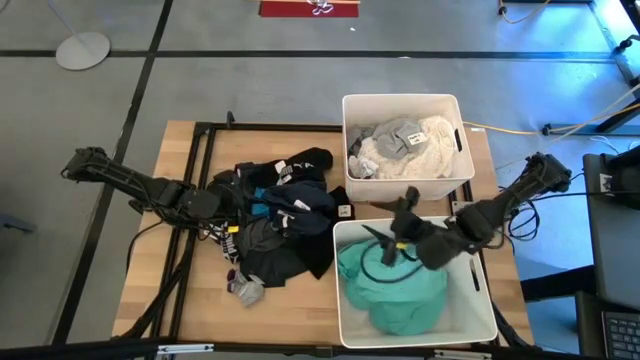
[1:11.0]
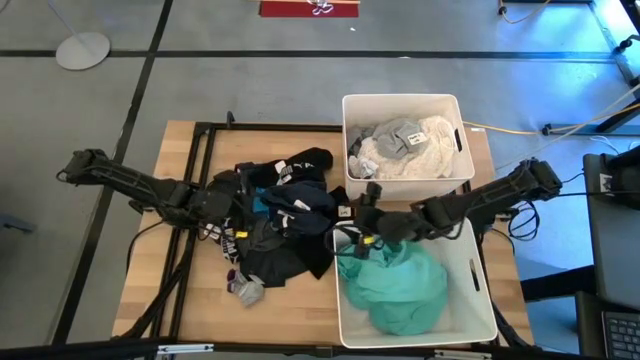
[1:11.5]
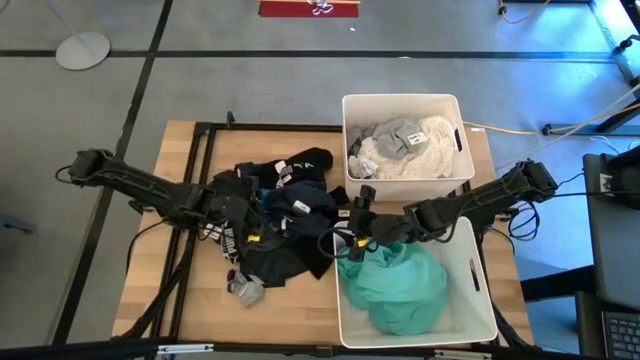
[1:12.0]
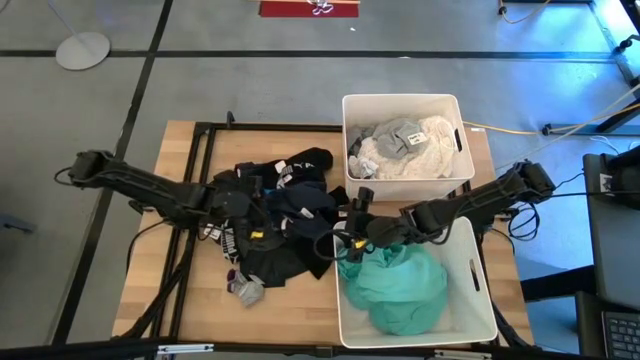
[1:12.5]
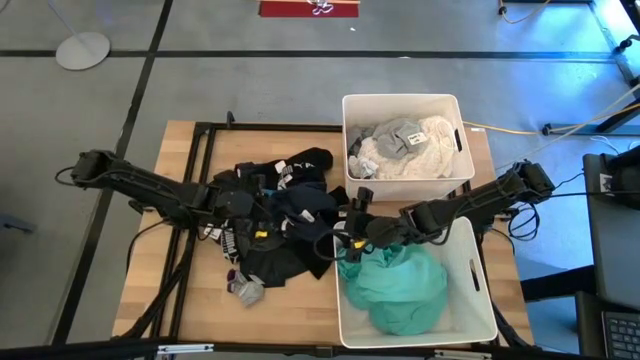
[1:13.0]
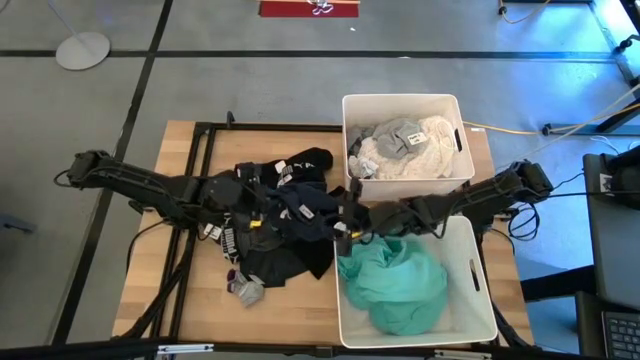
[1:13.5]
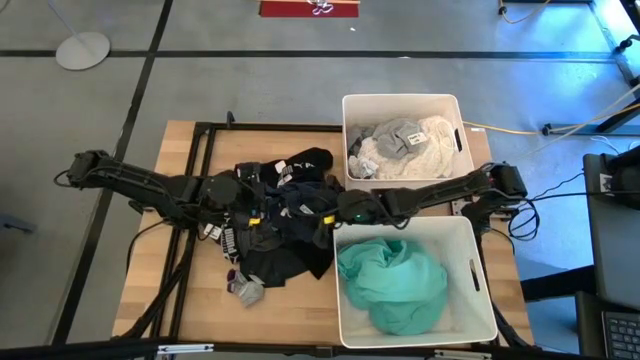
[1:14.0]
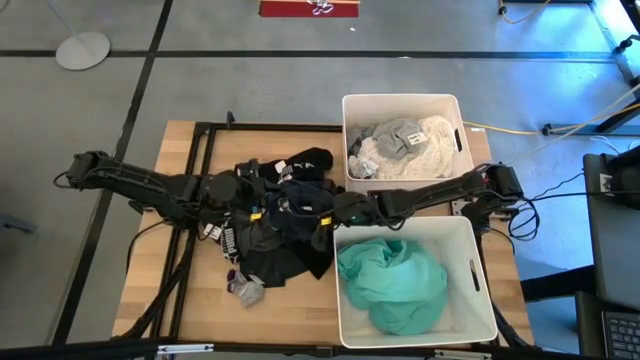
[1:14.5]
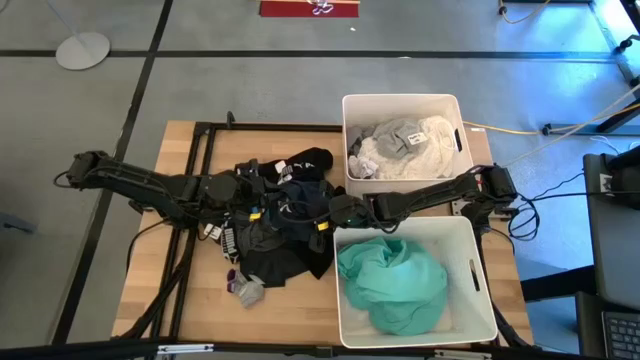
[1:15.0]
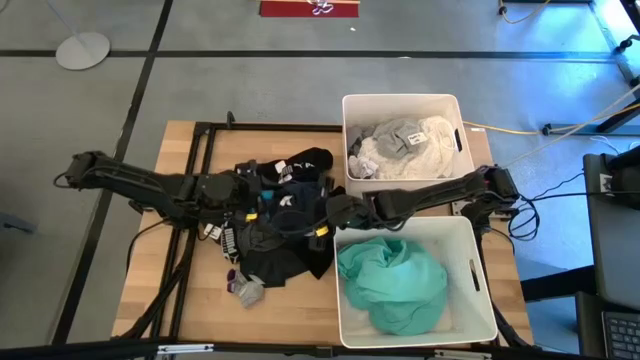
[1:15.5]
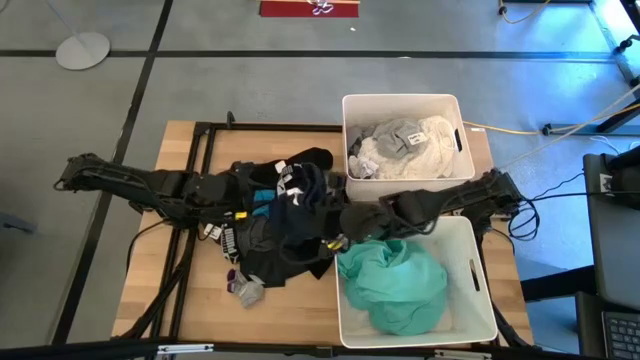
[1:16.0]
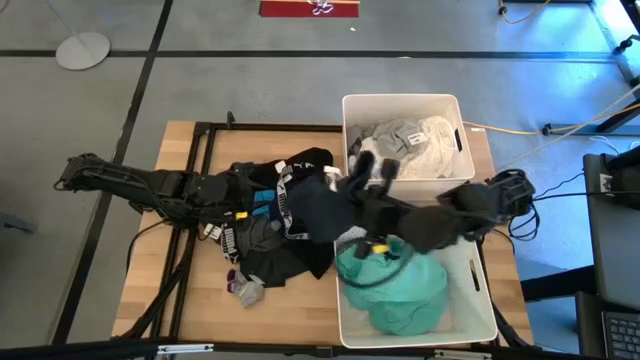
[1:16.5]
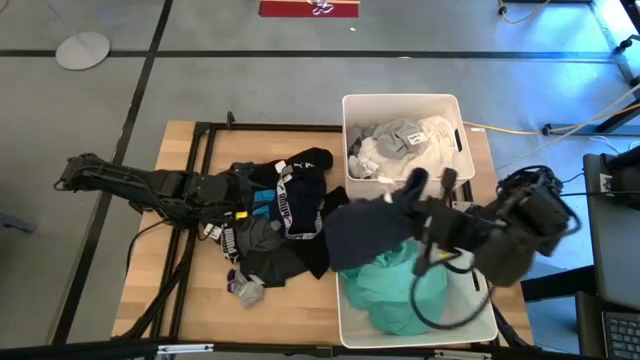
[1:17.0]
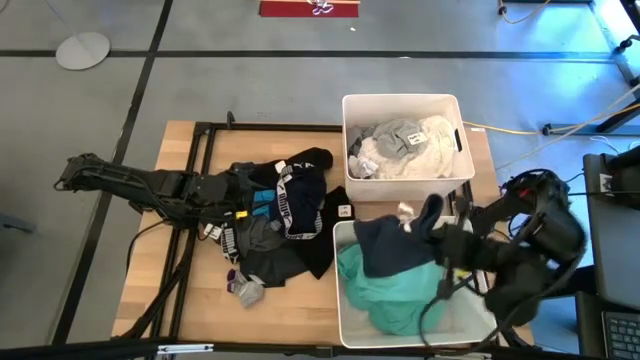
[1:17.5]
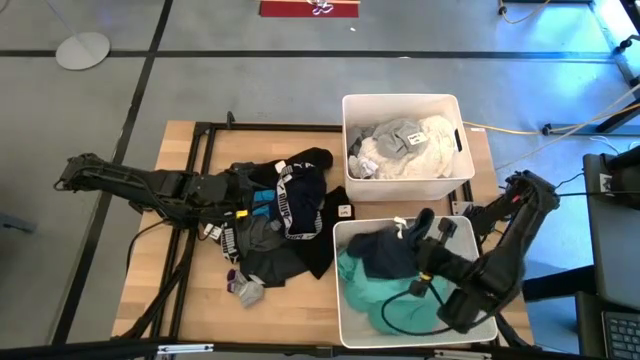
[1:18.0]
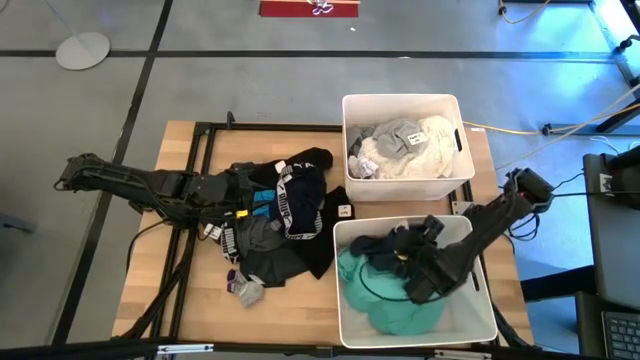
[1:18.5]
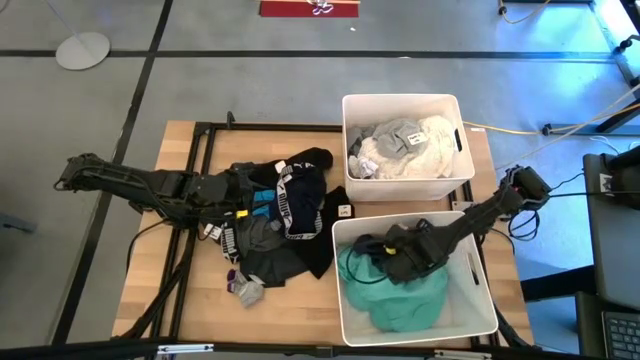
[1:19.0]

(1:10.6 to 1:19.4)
Task: Sort clothes
Put the blue pants into the bottom white laundry bin

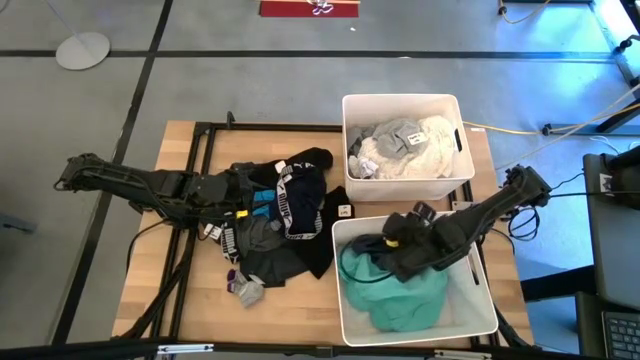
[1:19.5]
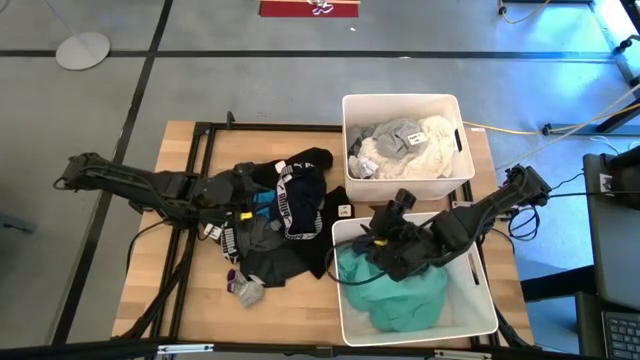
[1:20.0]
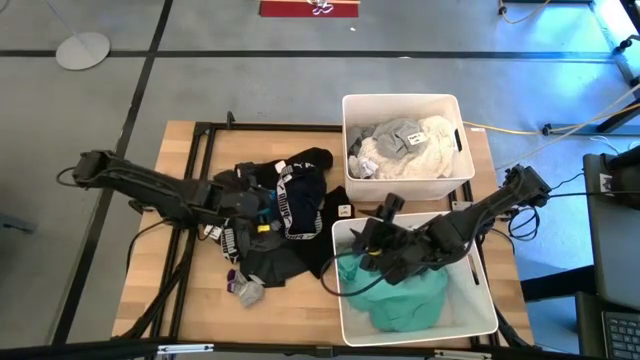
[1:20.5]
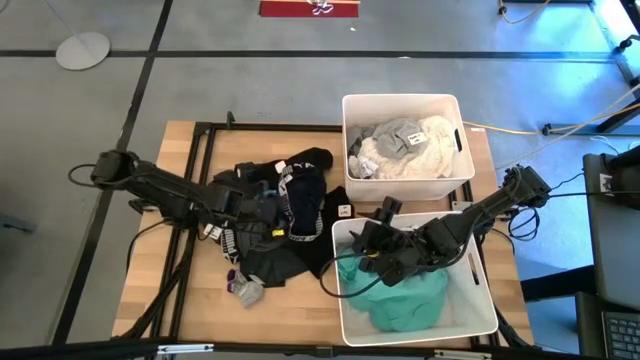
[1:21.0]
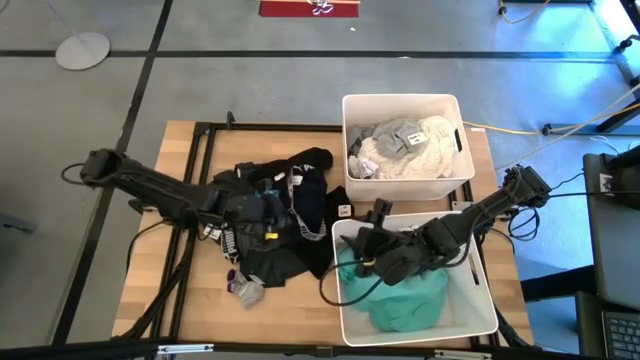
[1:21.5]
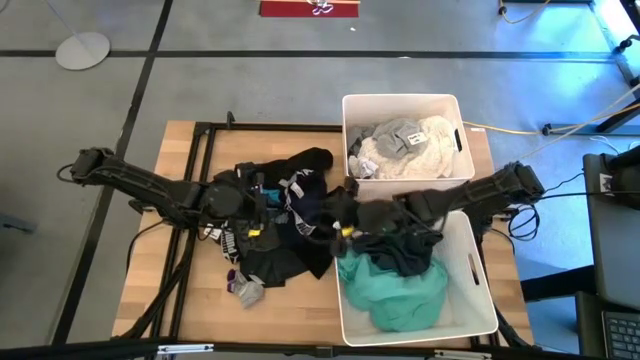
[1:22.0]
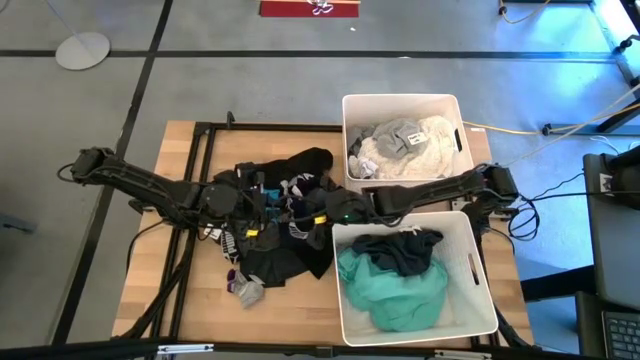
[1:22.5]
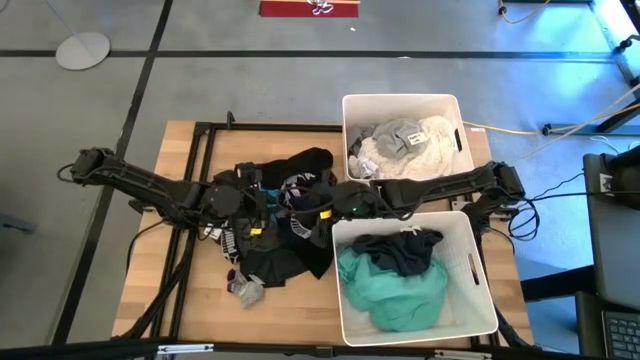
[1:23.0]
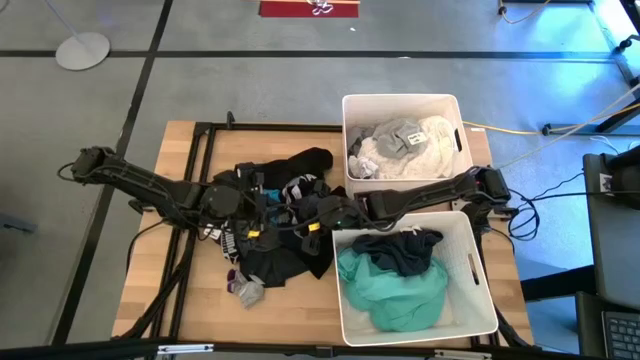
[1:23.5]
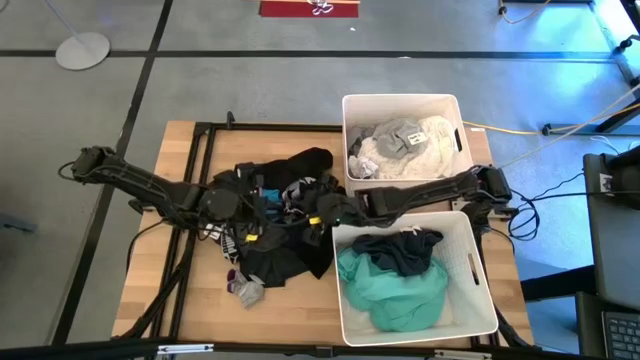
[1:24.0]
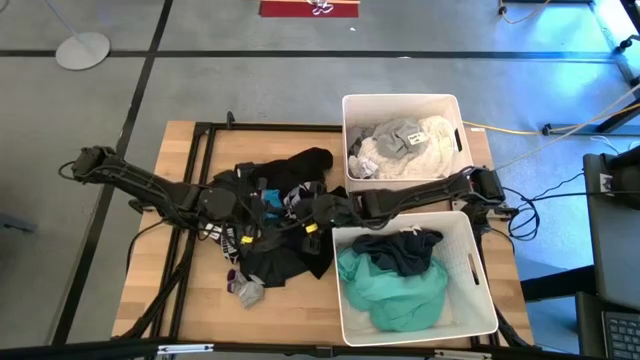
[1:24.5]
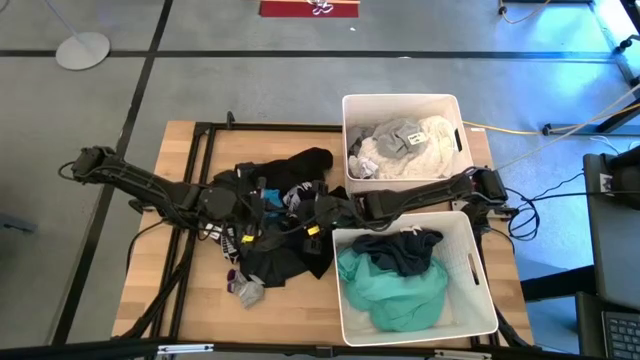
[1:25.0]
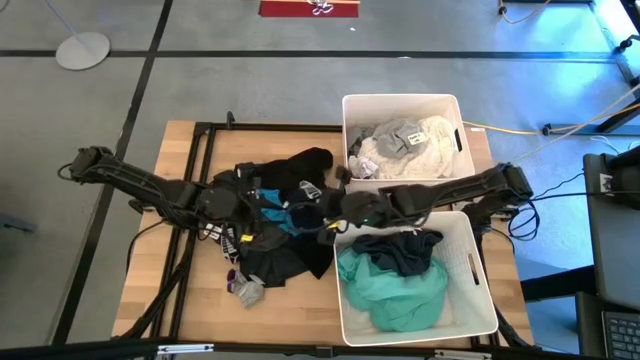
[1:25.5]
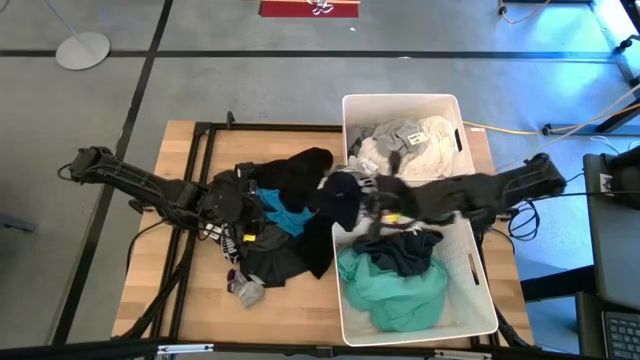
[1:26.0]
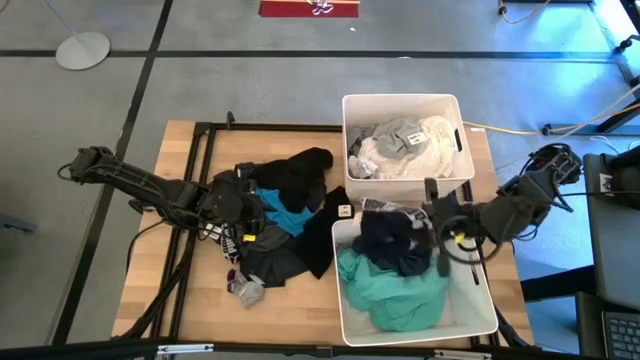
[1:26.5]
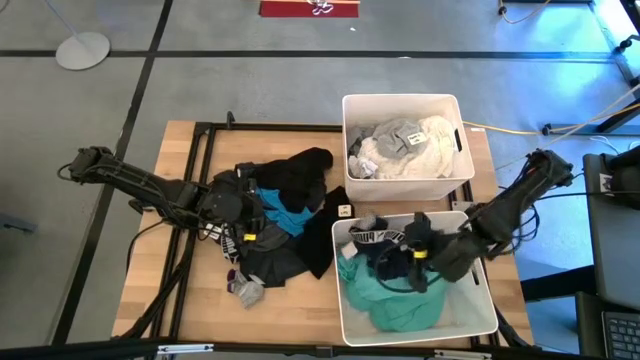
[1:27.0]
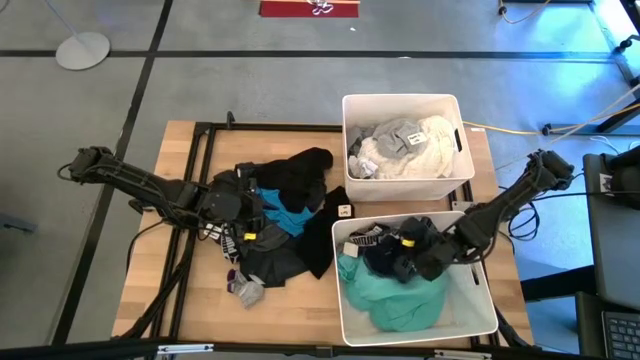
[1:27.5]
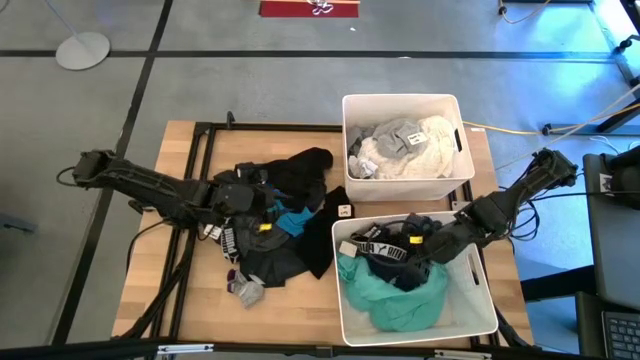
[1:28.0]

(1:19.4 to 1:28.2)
Put the blue underwear into the bottom white laundry bin

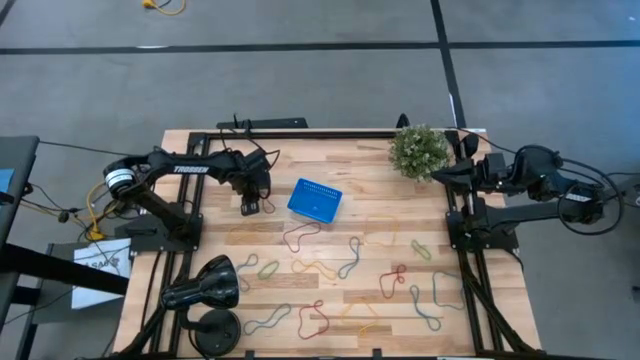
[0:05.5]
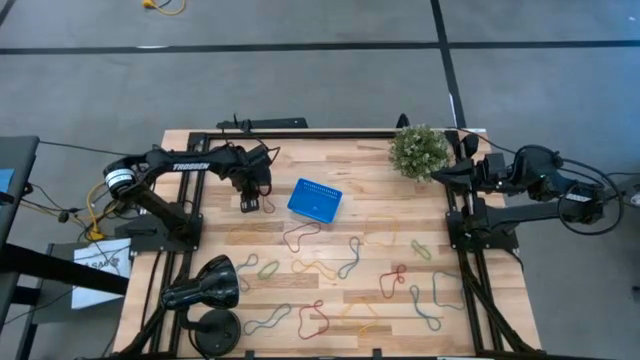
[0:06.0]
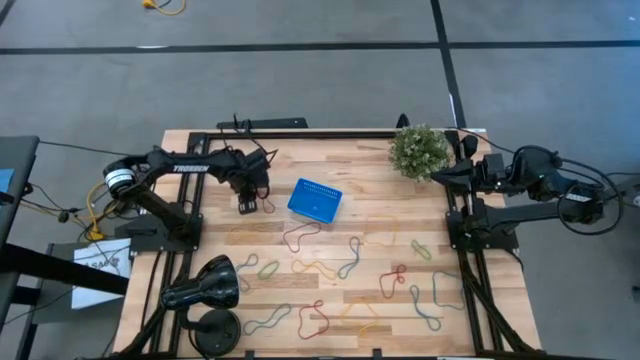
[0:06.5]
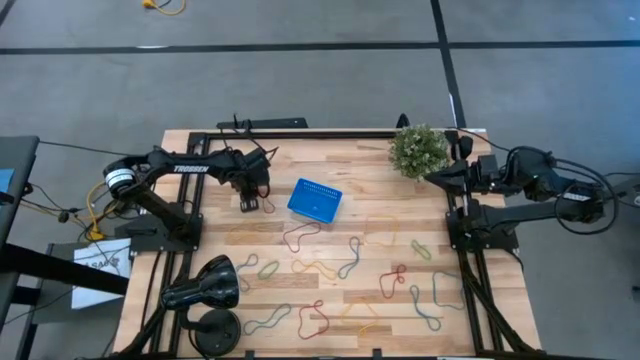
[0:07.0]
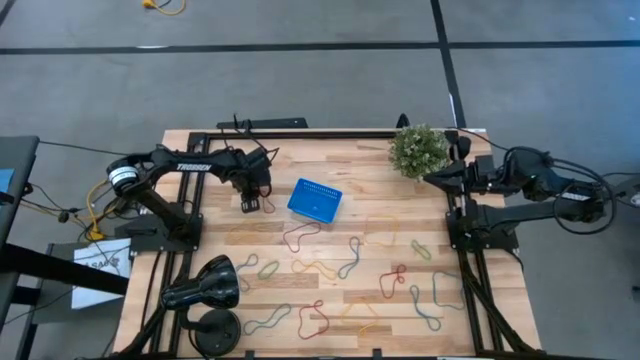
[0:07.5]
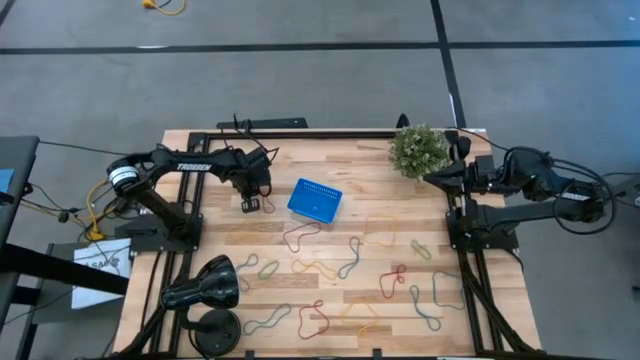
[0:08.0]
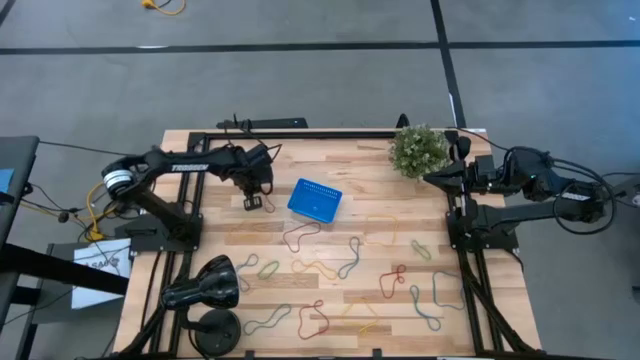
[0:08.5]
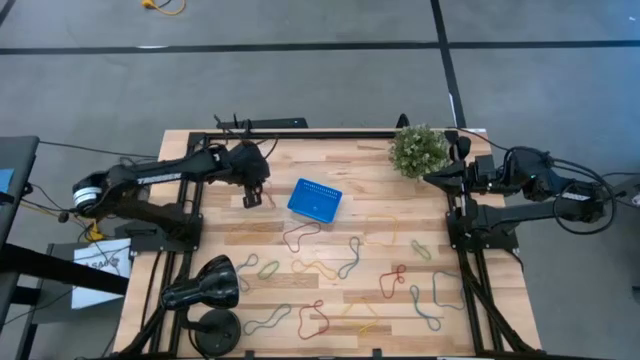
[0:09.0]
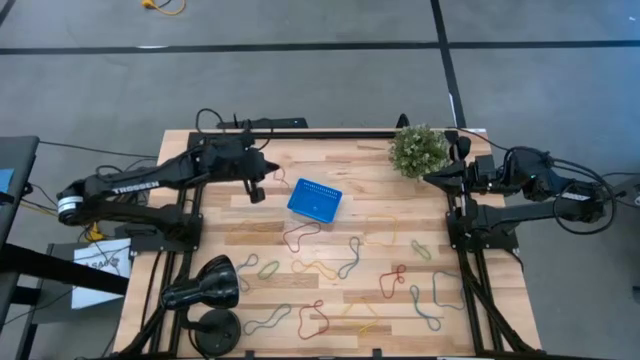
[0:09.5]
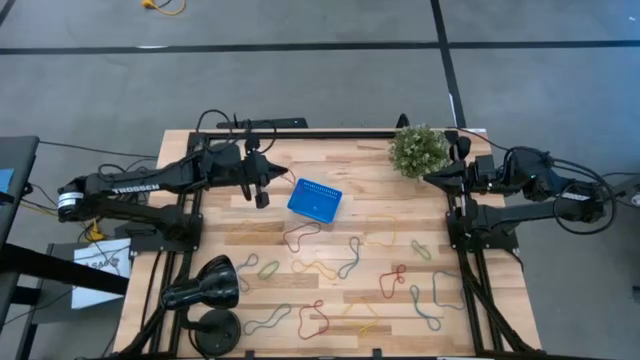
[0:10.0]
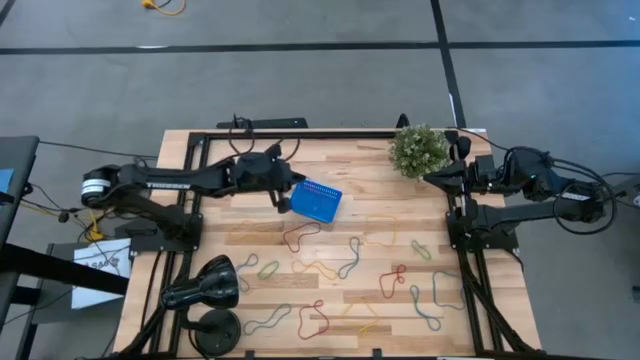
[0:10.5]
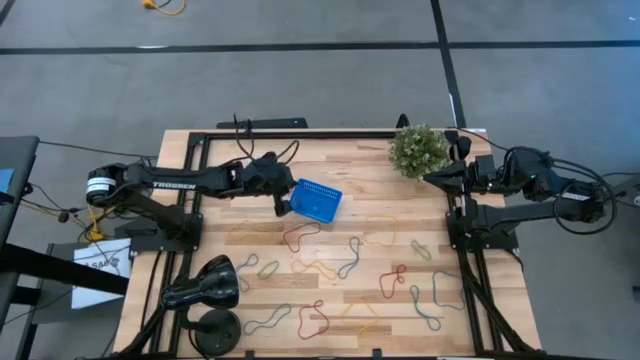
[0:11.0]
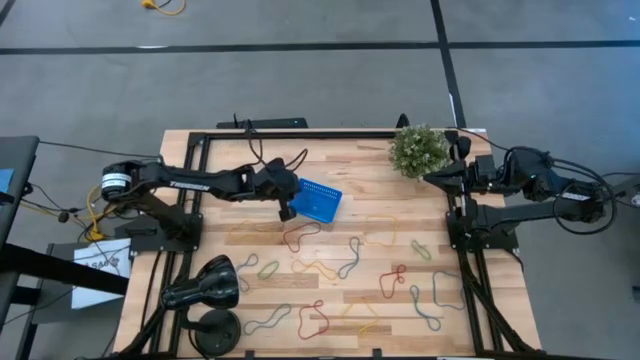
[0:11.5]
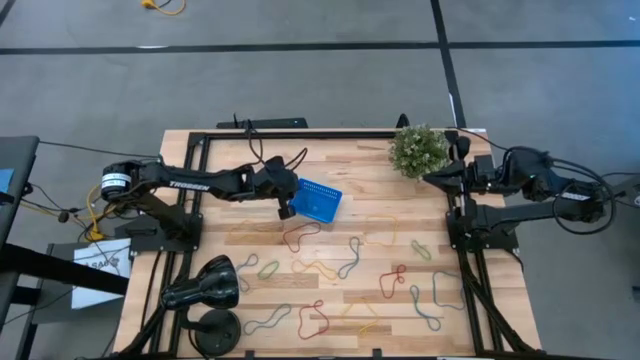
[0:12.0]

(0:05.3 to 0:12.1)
Task: Pick and place items into bin
Put the red rubber band into the blue bin
